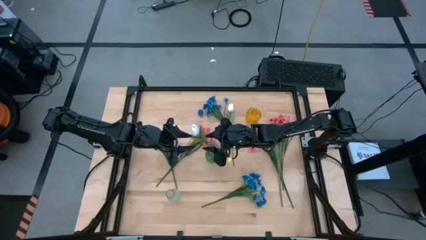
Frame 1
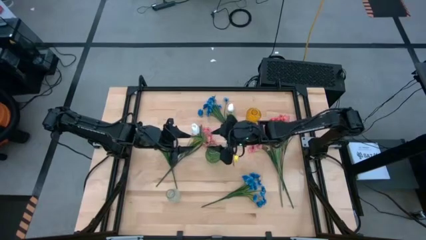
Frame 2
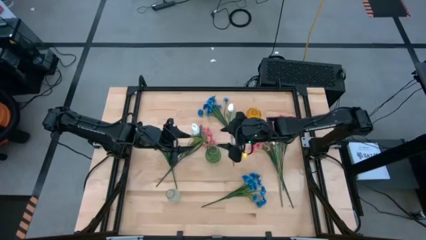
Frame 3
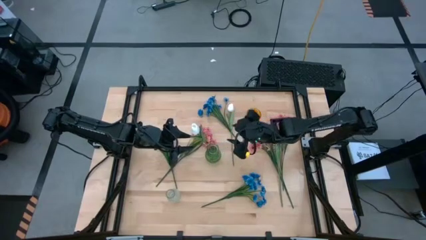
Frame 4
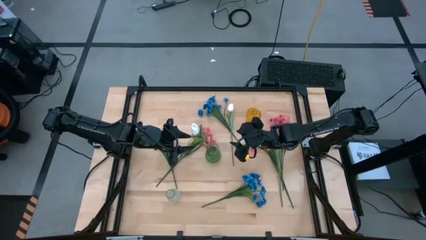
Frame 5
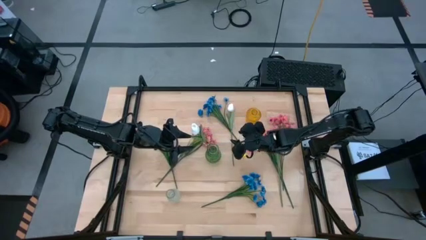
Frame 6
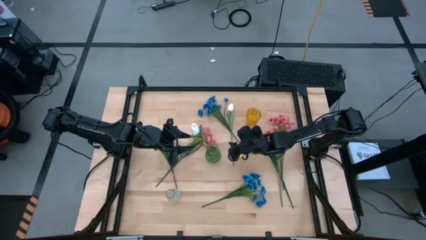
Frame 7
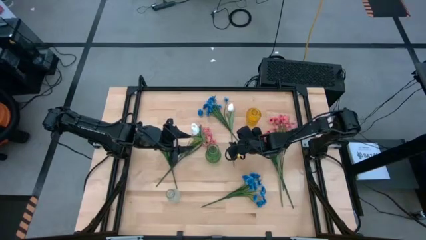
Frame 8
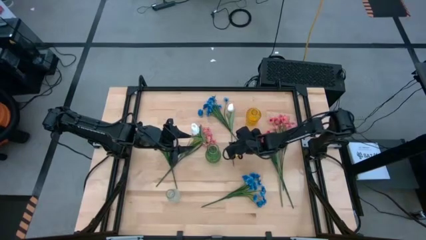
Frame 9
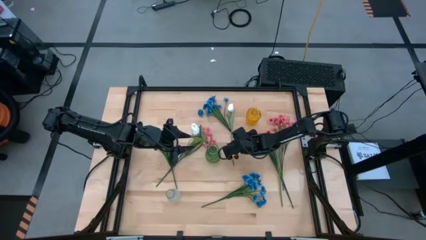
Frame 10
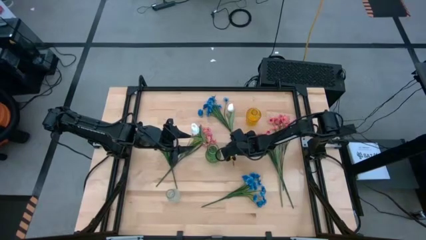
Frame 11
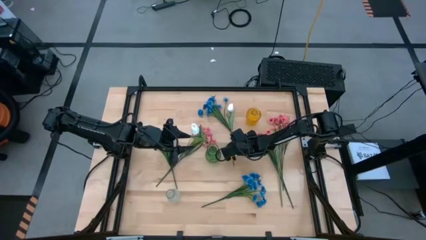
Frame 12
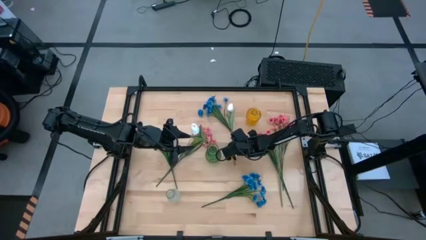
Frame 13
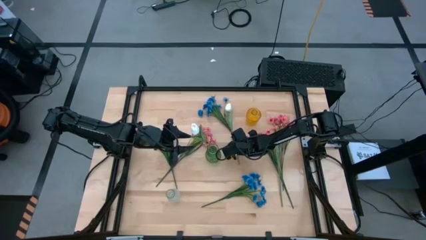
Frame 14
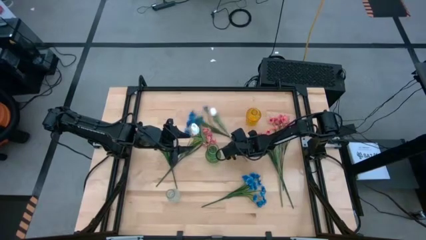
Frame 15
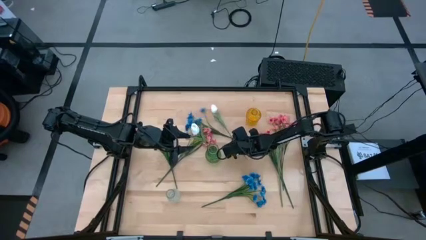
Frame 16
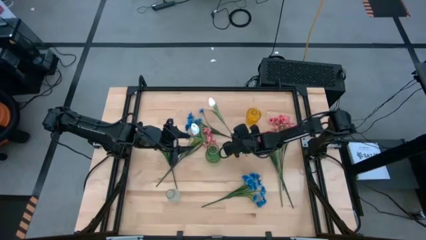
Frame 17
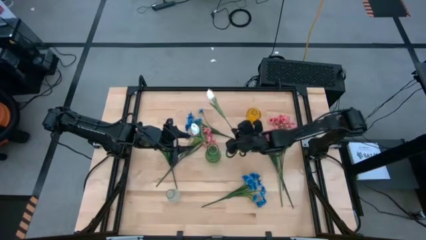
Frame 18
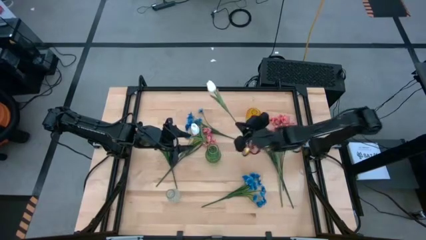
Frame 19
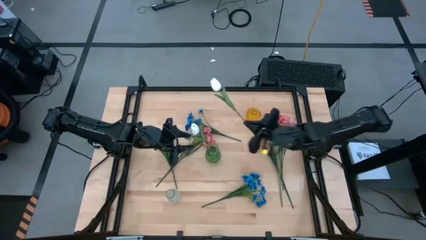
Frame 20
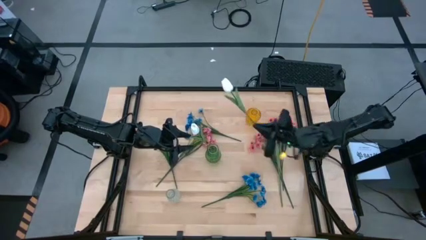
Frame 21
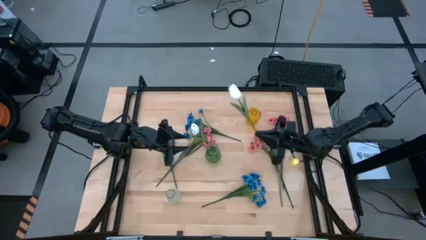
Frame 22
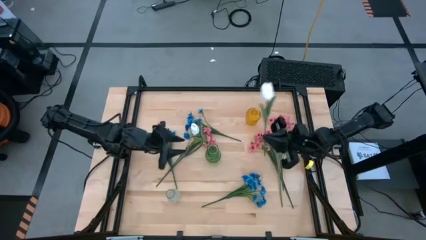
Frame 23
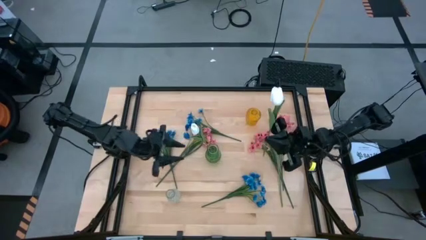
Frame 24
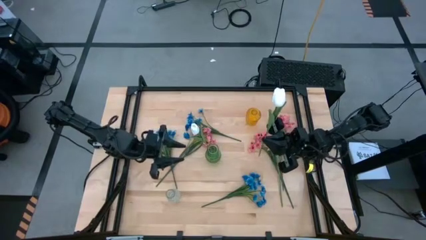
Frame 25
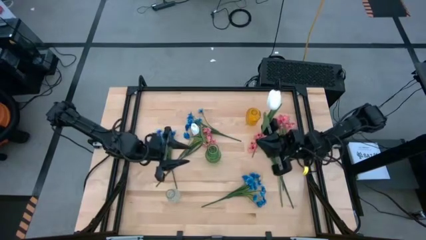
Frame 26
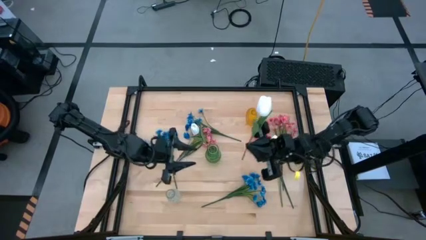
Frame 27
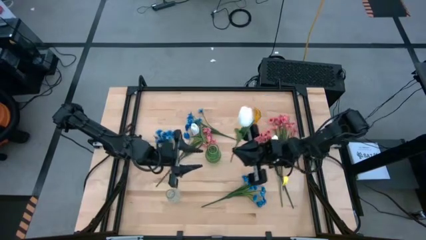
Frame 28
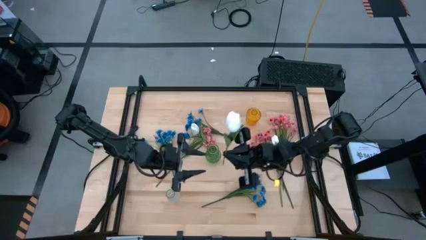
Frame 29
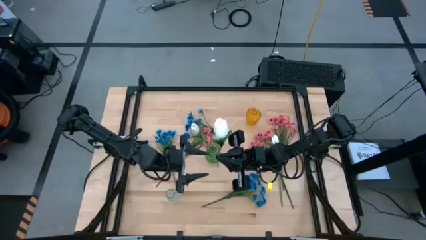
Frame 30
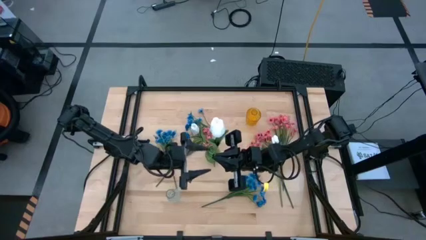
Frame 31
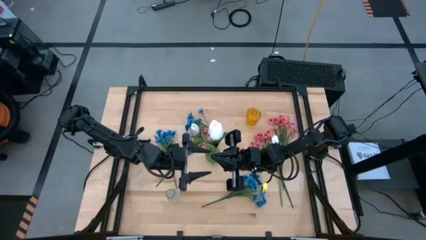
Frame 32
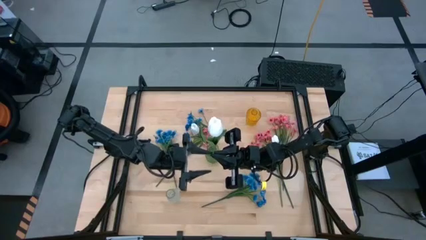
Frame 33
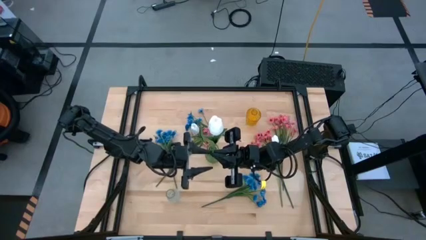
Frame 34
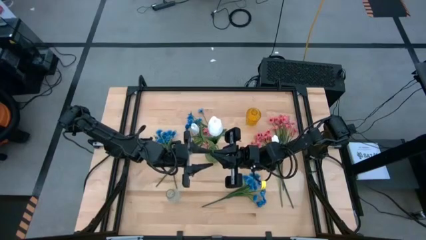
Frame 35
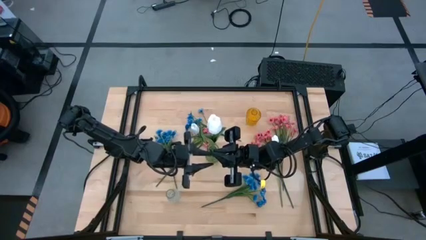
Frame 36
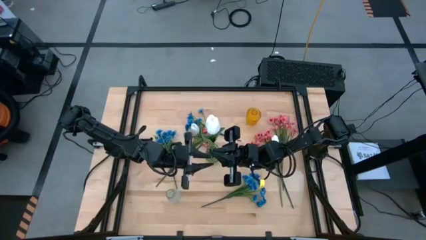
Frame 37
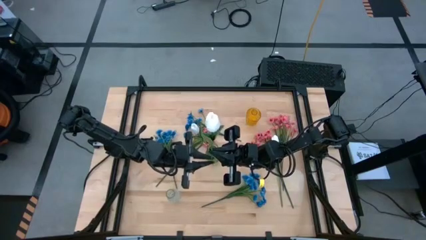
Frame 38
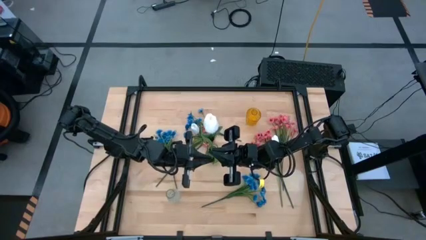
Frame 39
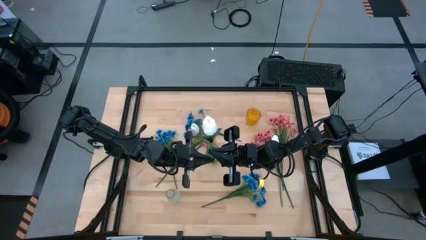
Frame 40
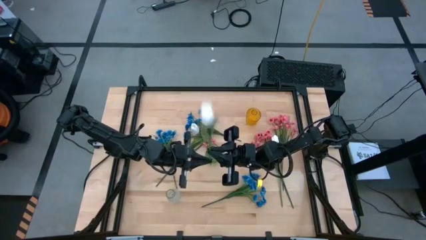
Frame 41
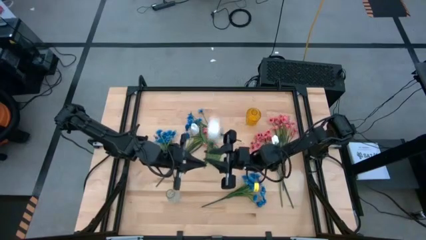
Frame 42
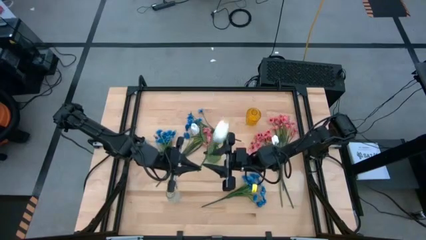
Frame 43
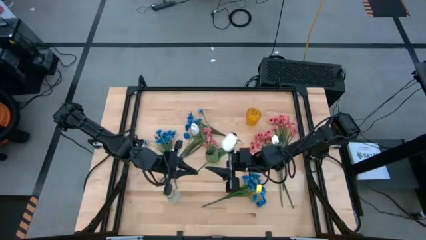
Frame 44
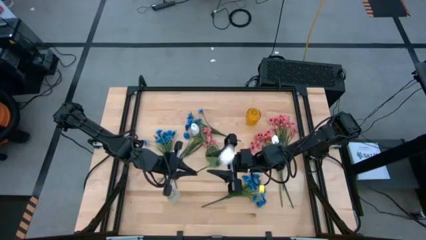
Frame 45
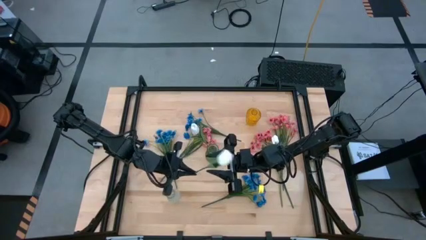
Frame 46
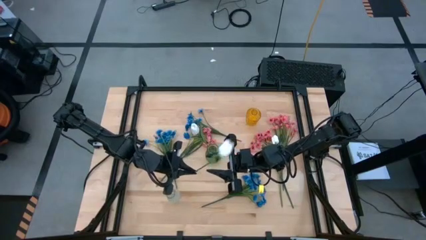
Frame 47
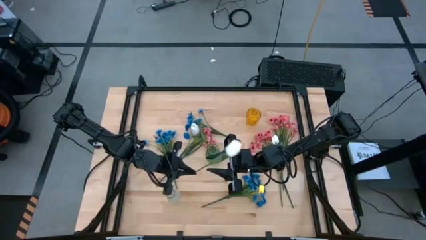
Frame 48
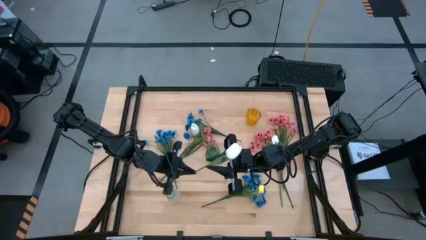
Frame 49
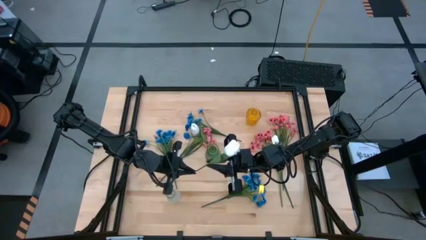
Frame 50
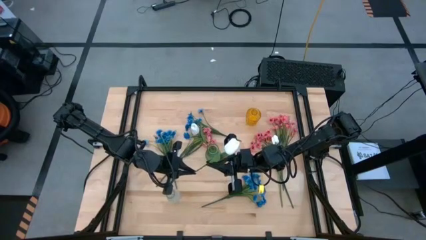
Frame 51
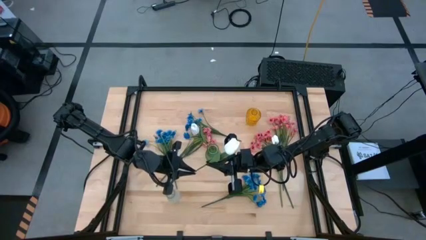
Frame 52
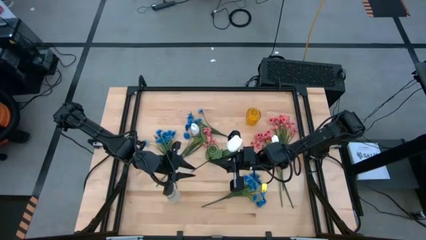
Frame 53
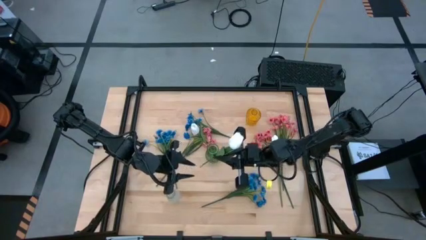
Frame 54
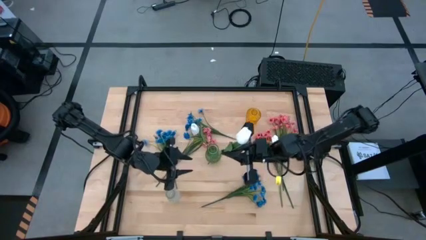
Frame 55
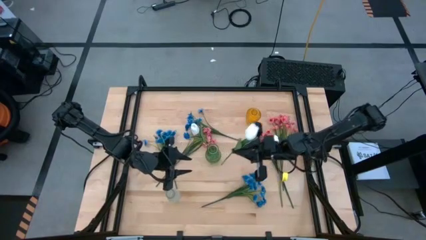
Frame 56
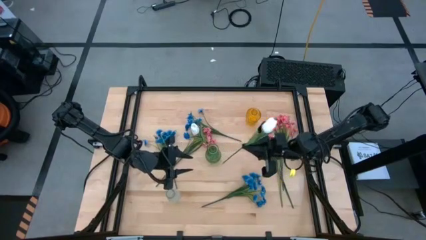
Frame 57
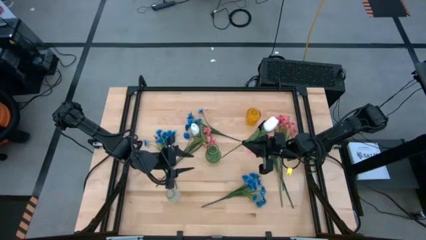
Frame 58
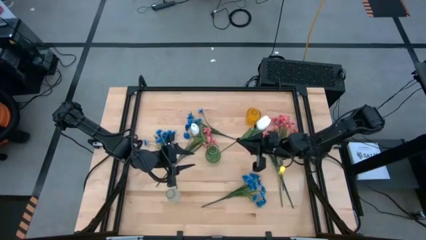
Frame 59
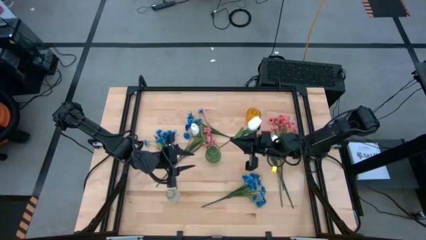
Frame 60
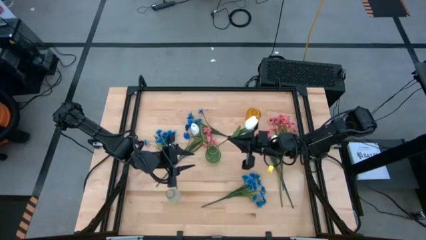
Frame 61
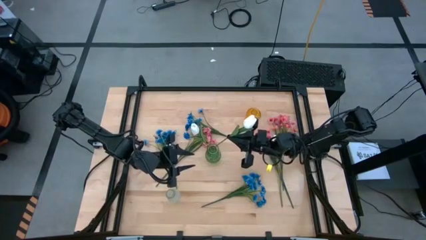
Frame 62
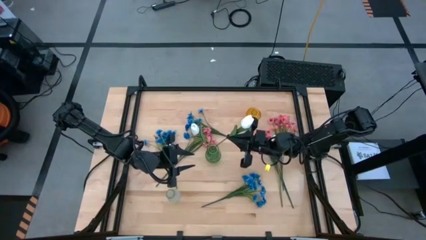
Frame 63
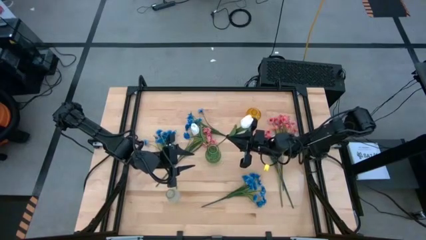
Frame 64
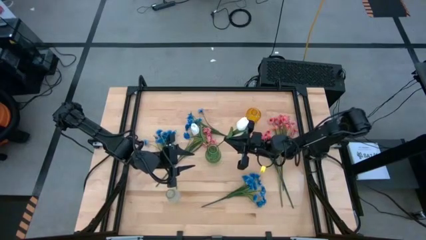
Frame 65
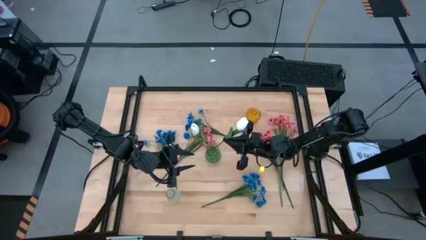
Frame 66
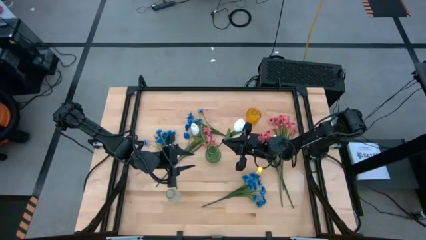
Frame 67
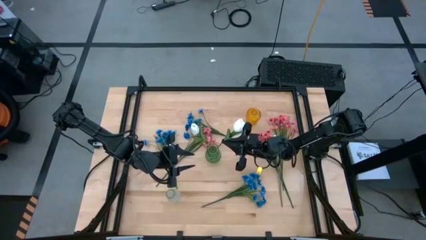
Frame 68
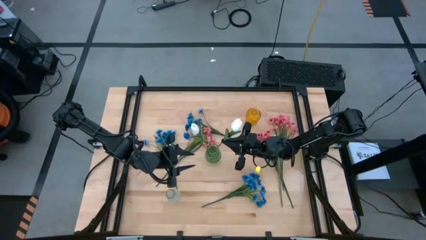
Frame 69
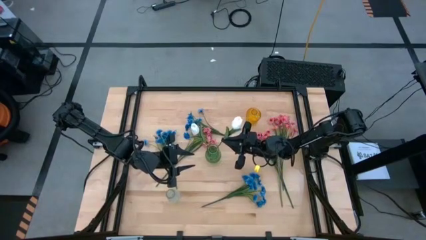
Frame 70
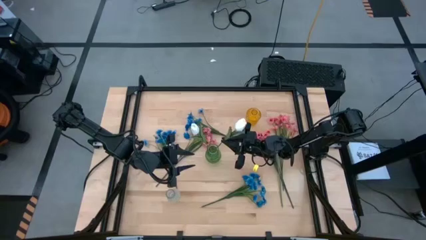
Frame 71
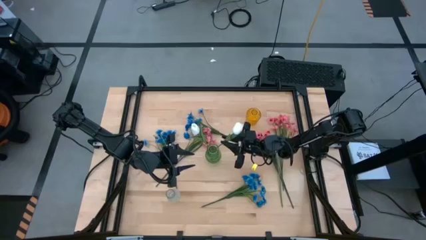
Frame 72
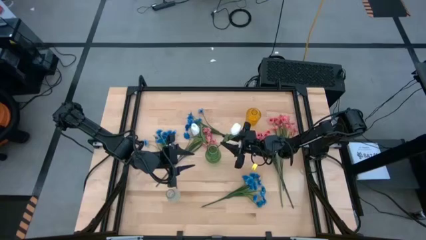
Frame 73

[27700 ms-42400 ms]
Task: Sort flowers into vase by color
Put the left white flower into the green vase
